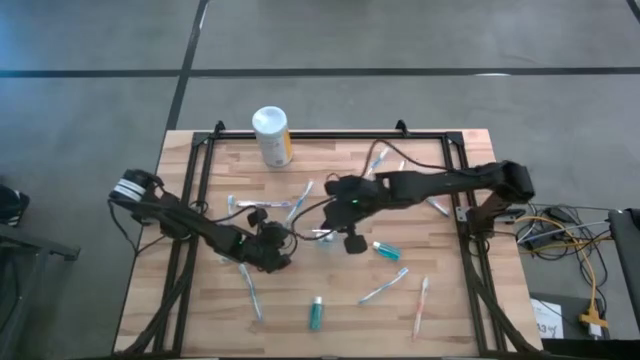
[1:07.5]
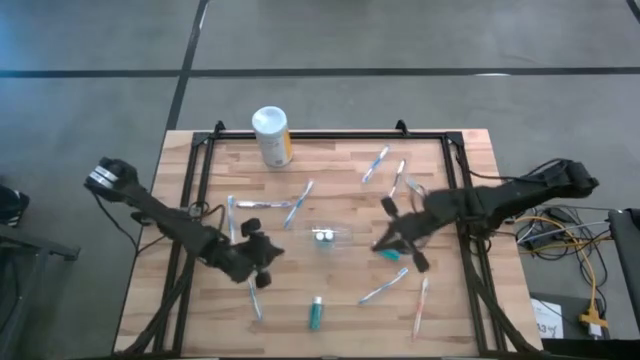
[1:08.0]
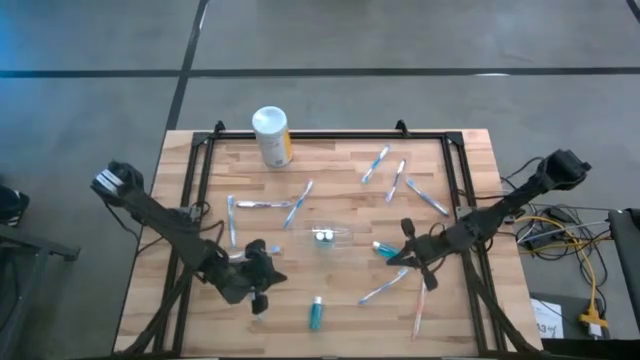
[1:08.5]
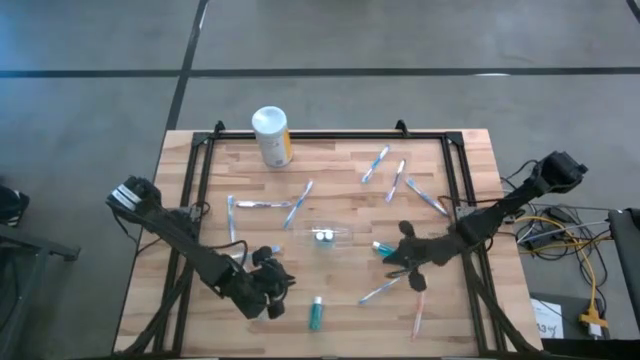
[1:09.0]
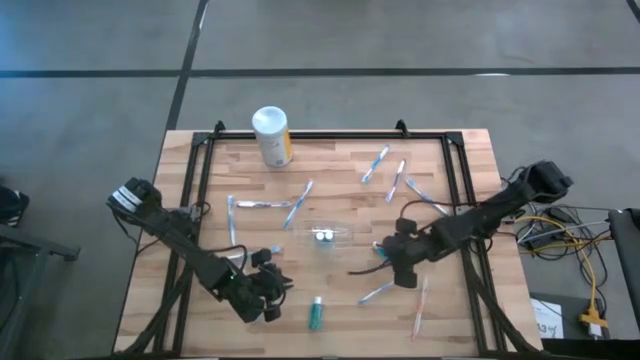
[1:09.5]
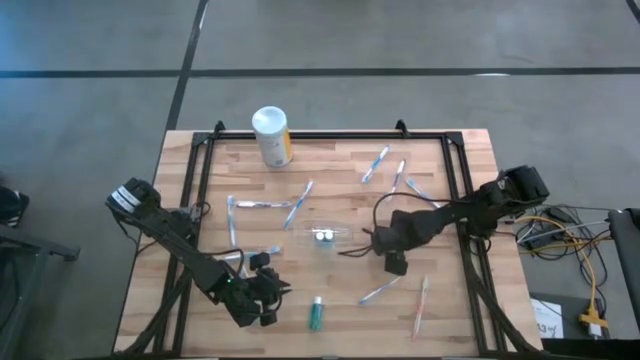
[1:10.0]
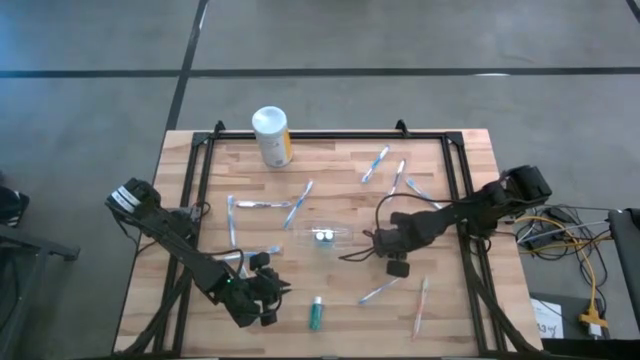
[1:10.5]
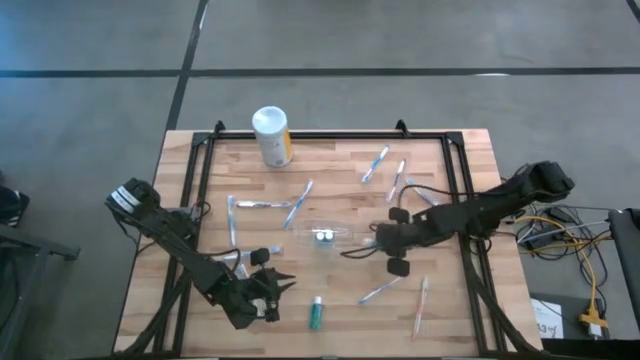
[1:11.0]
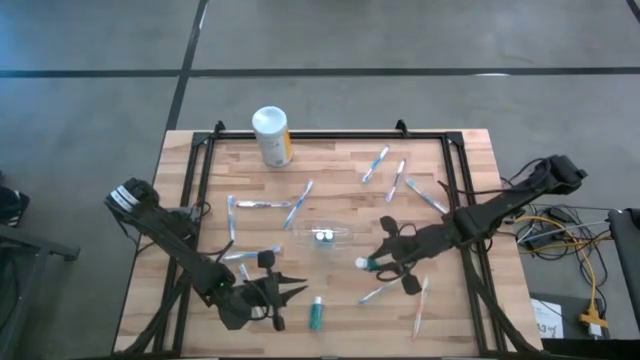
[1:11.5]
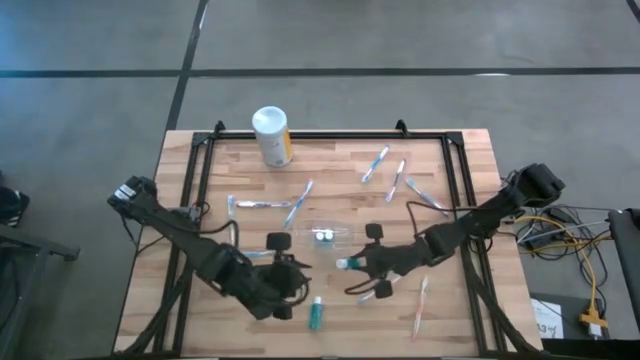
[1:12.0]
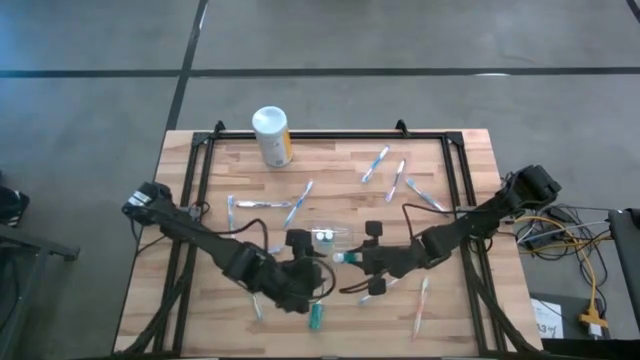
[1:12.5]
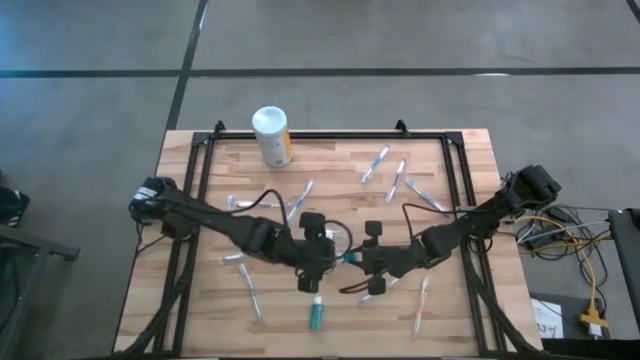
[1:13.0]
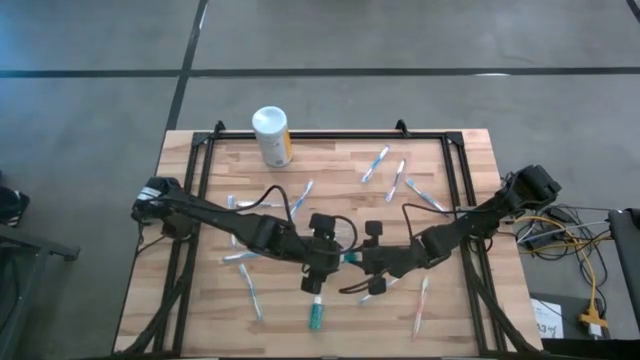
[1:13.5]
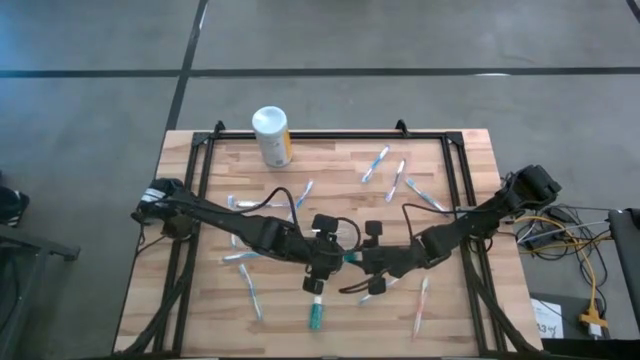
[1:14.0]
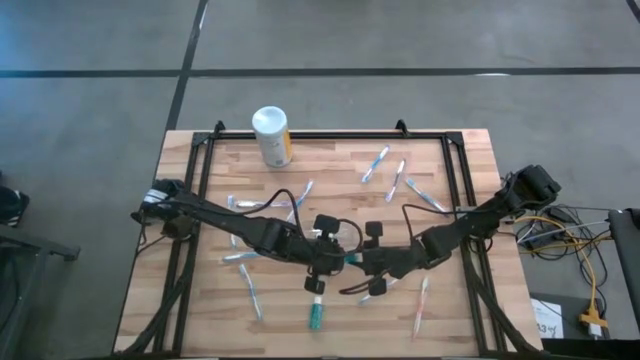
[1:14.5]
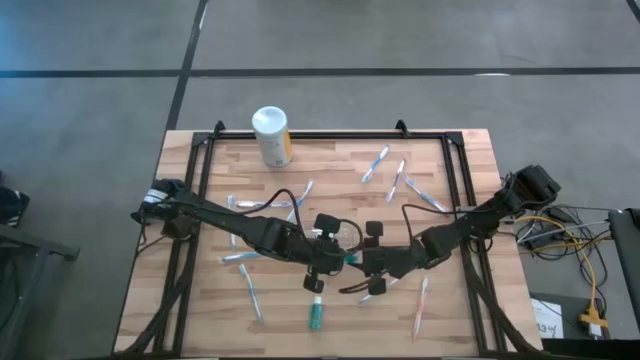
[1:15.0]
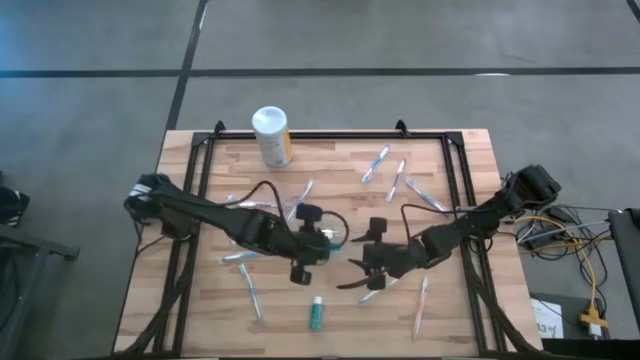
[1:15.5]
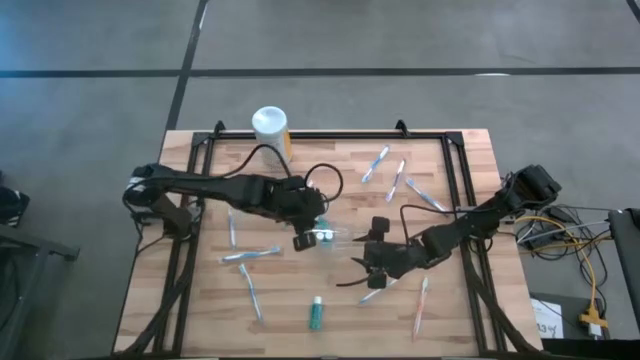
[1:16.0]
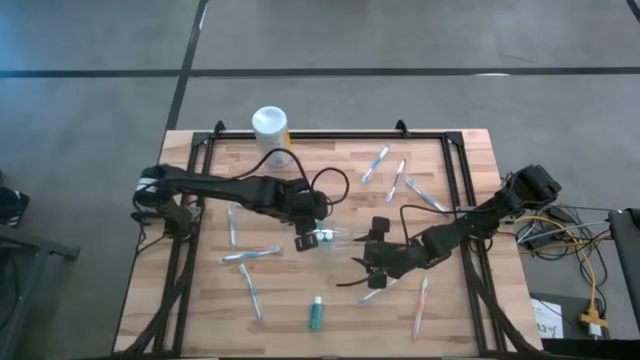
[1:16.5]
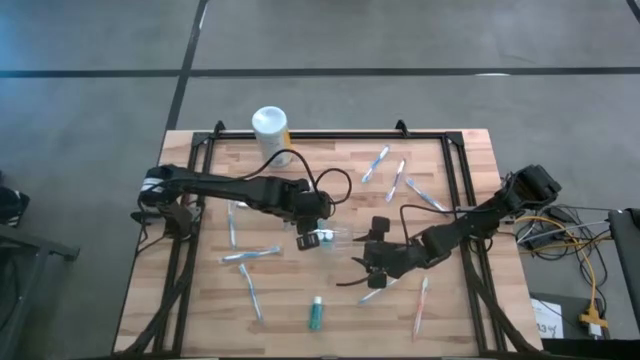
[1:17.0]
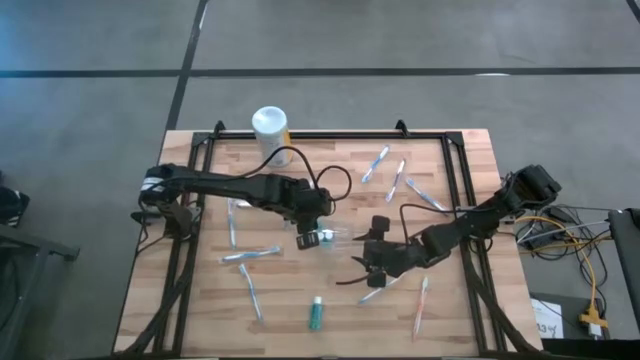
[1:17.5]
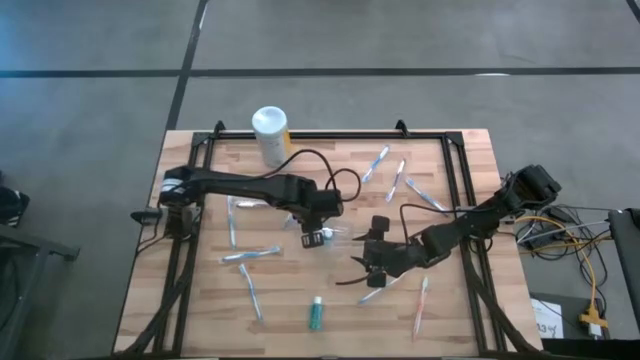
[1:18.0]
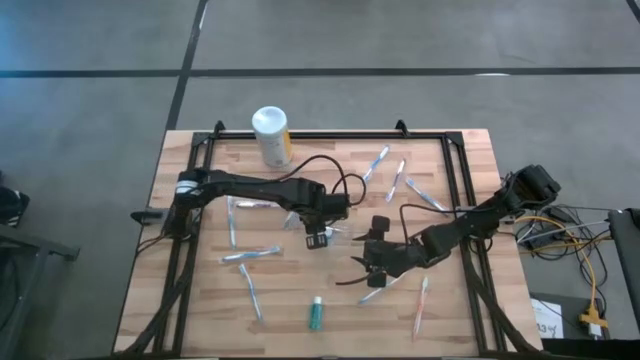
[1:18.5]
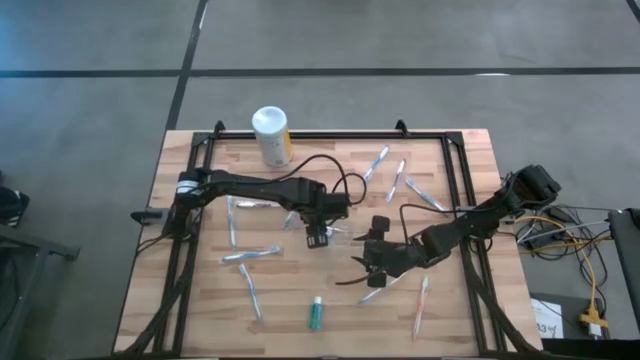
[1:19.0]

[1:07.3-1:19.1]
Task: Pick & Place toothbrushing station
Put the mouthwash into the transparent organizer

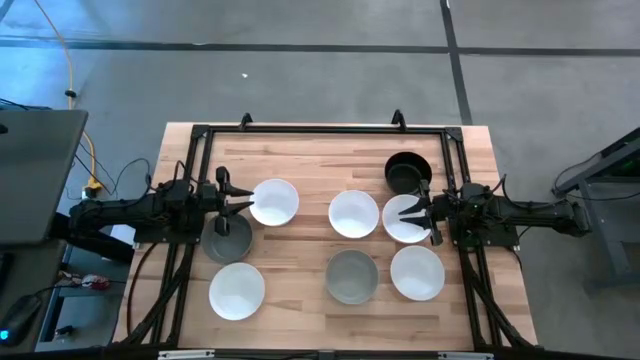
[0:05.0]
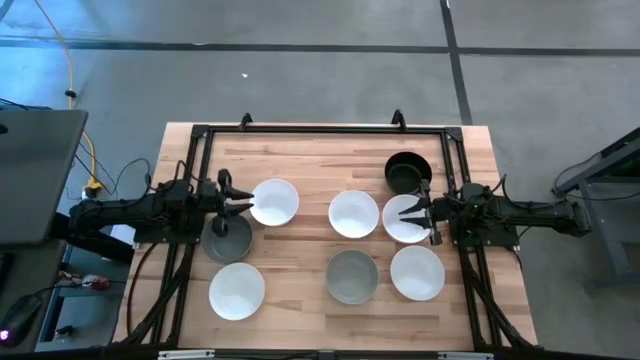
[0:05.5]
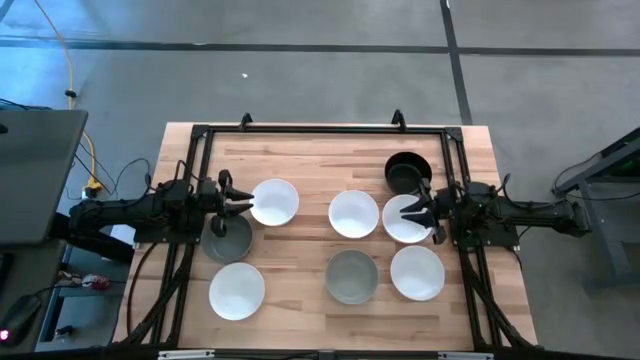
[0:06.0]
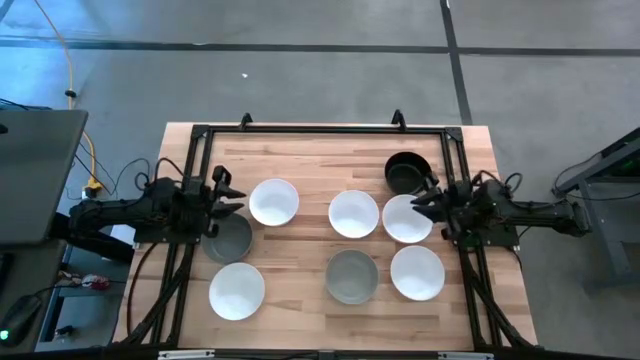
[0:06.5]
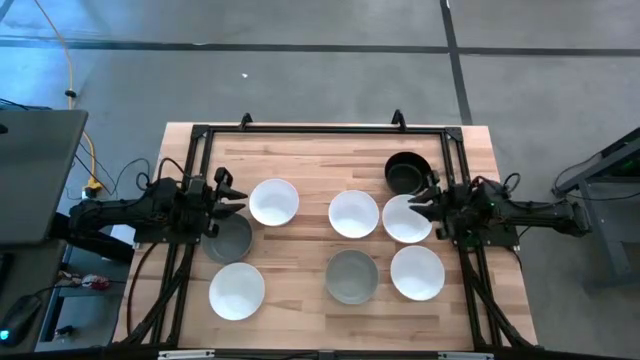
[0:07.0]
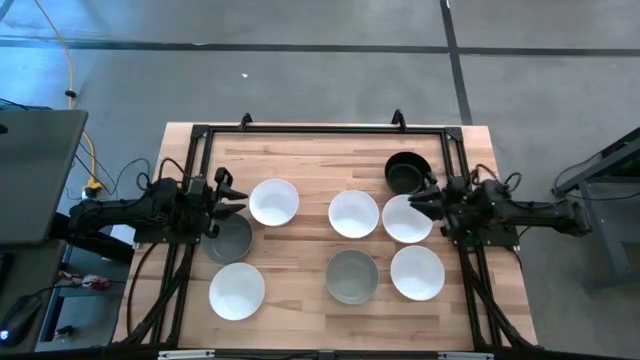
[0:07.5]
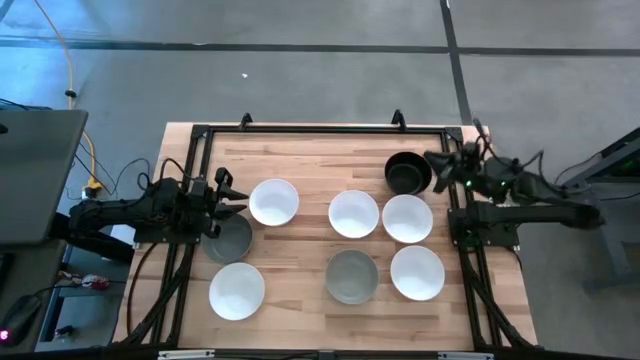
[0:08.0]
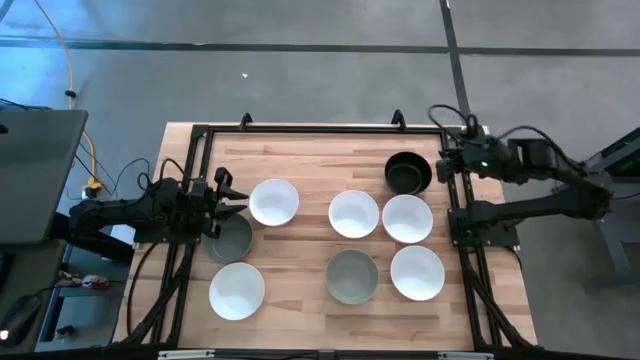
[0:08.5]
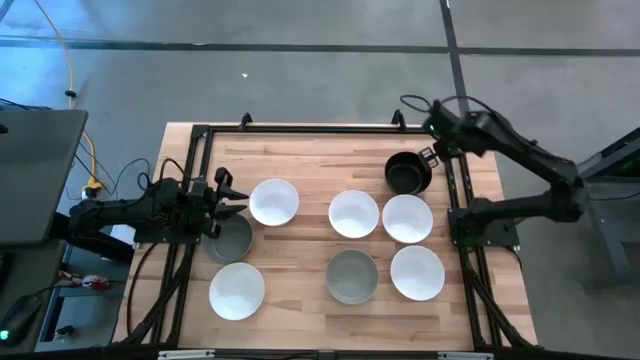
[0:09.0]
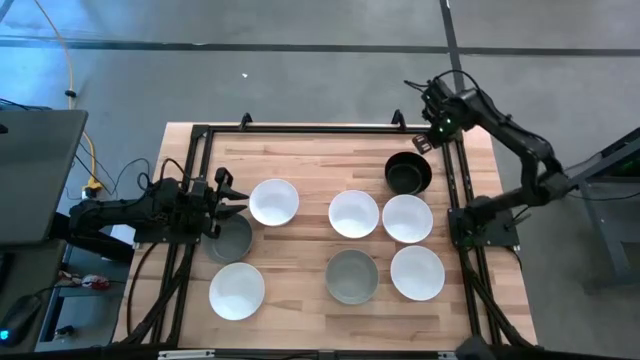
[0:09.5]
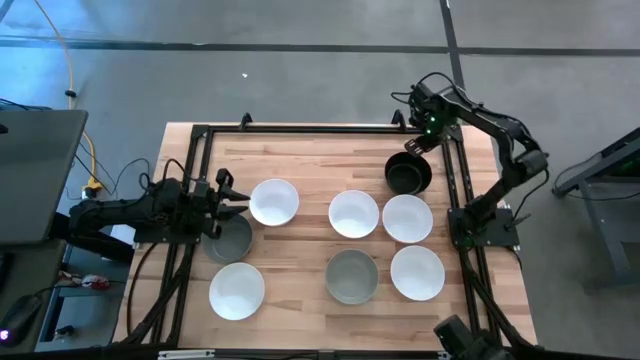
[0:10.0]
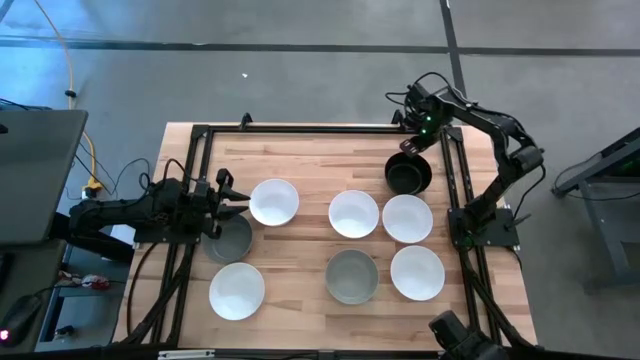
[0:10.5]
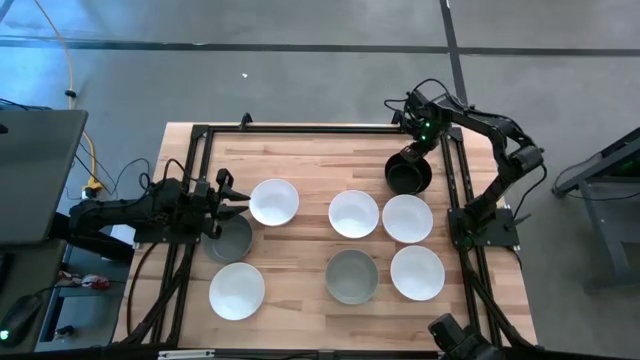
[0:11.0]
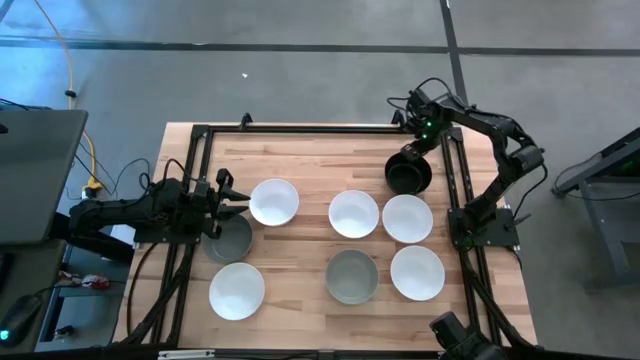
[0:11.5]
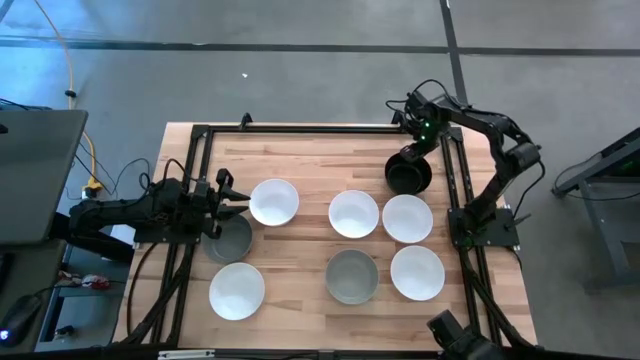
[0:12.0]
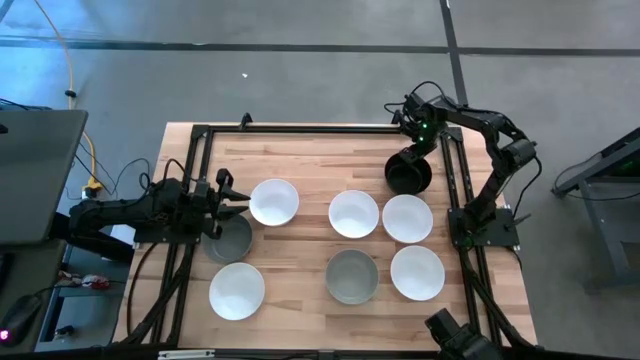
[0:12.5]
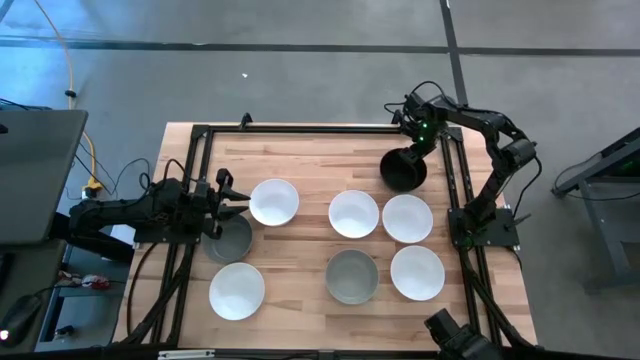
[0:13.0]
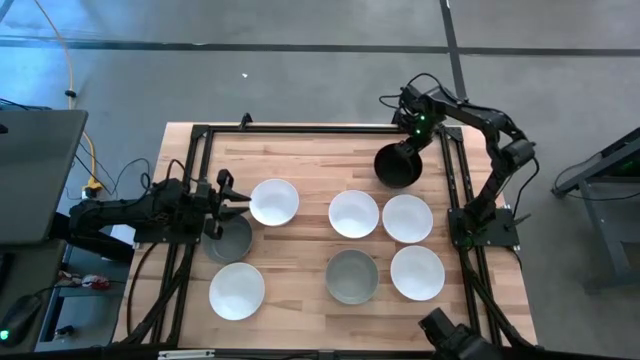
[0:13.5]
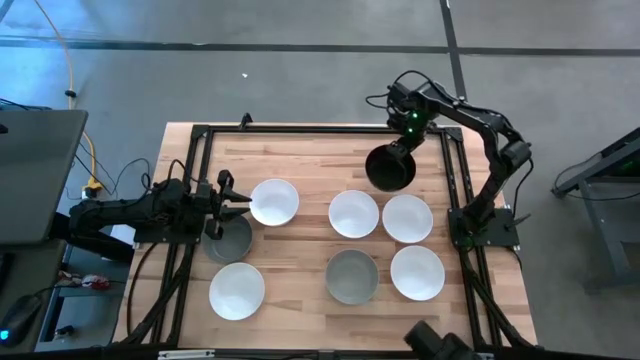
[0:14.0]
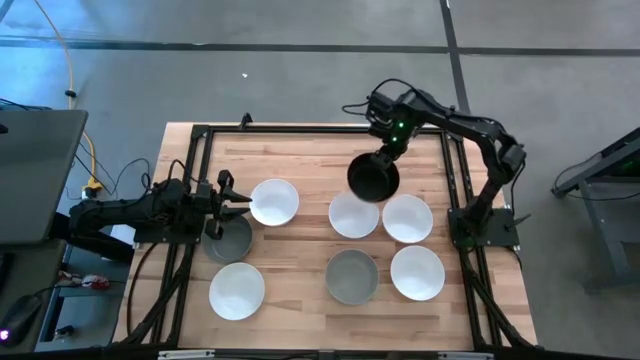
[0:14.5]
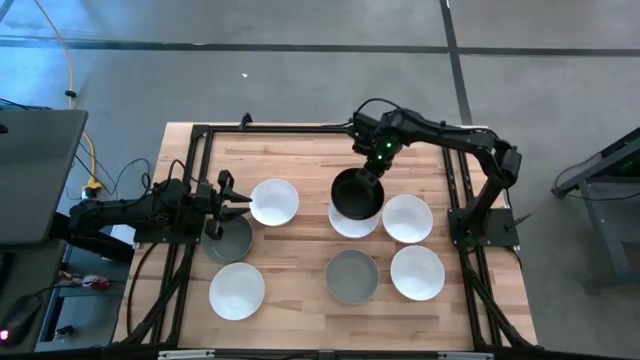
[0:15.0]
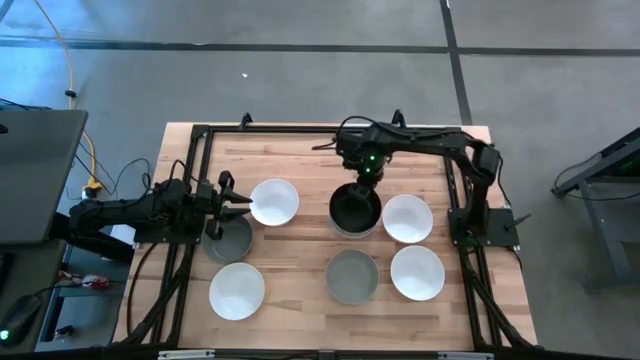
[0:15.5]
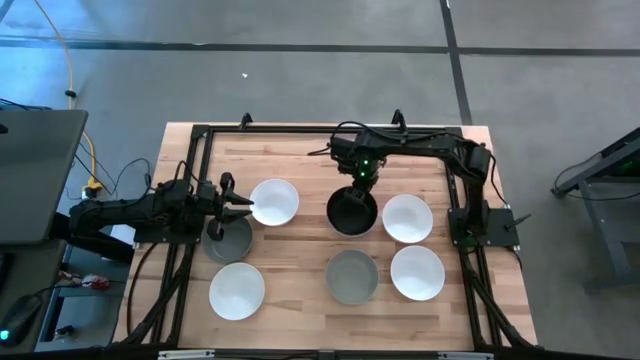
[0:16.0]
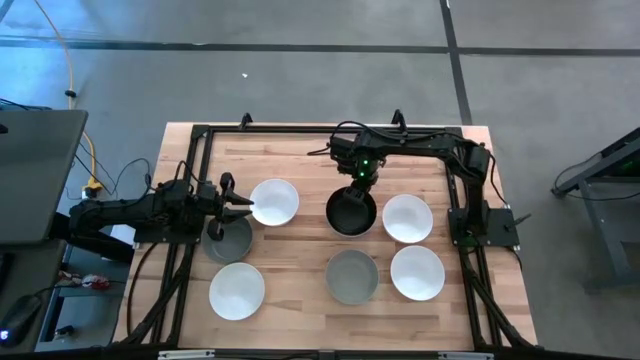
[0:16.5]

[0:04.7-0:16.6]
Task: Nest bowls inside each other
Stack the black bowl on top of the top middle white bowl
